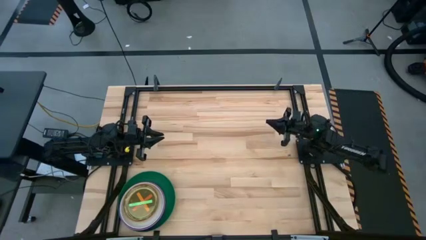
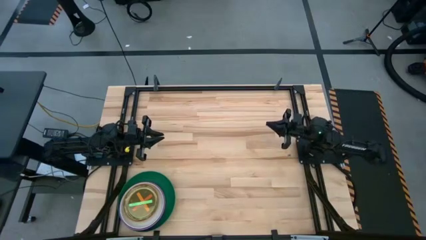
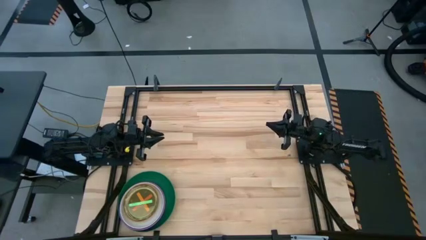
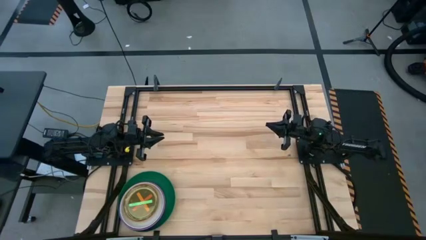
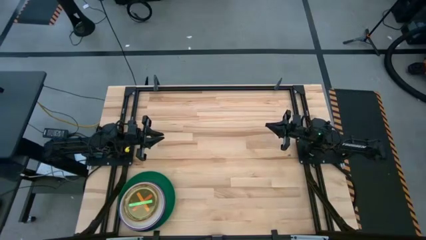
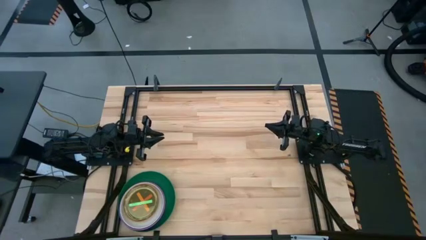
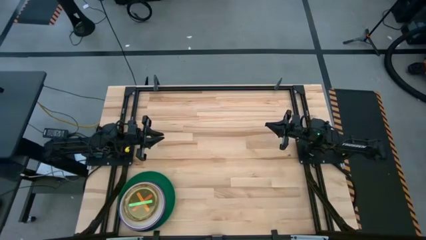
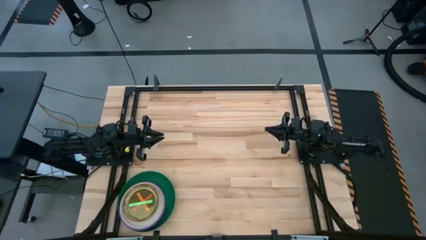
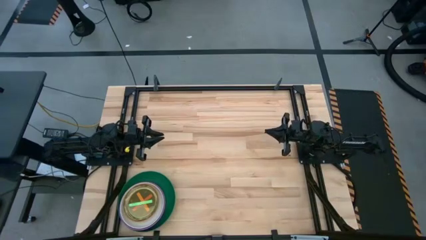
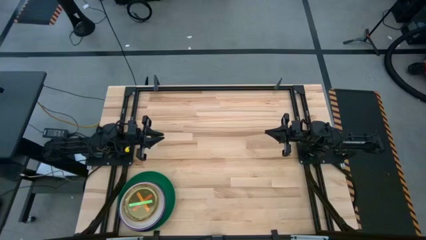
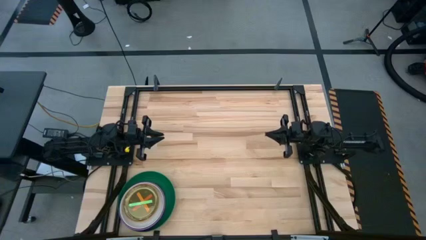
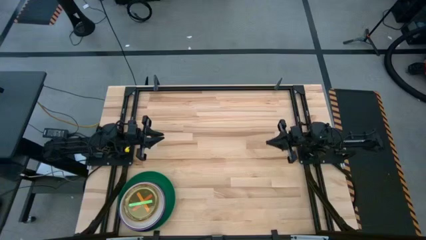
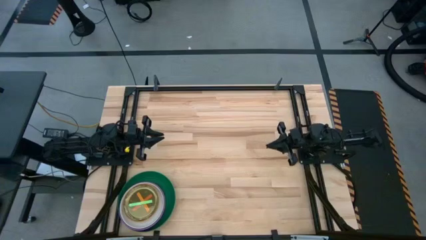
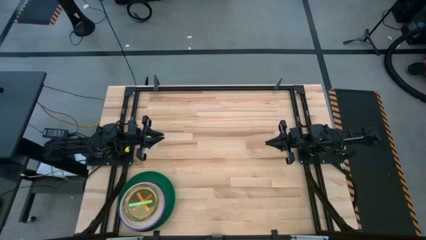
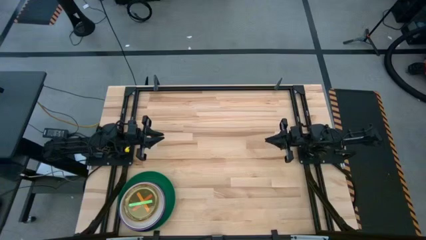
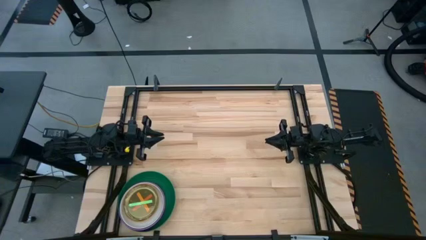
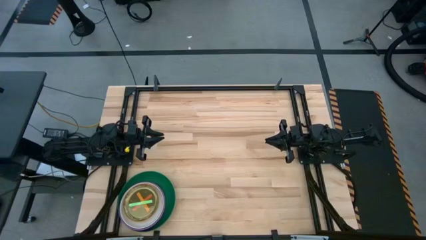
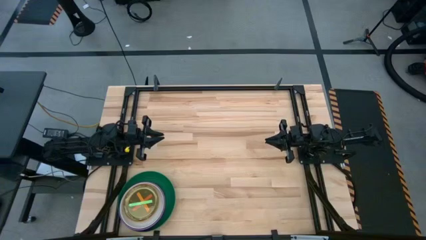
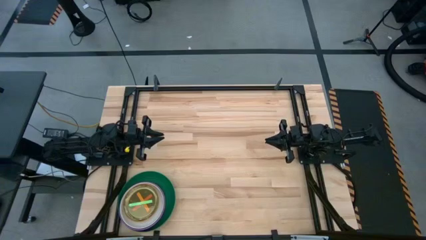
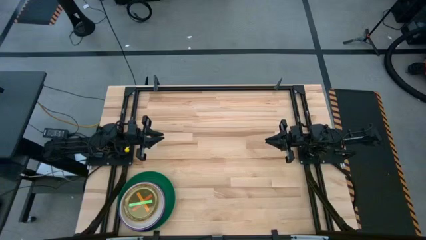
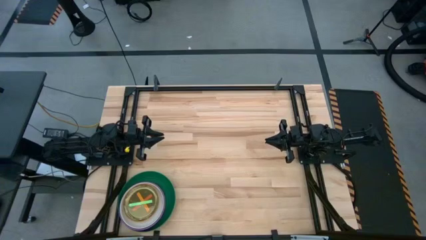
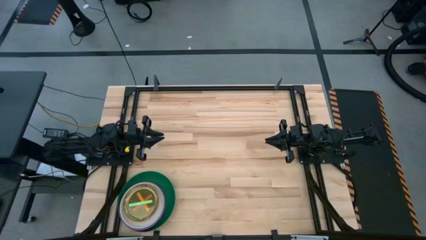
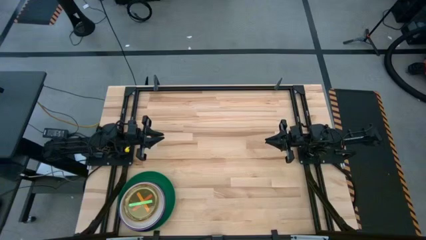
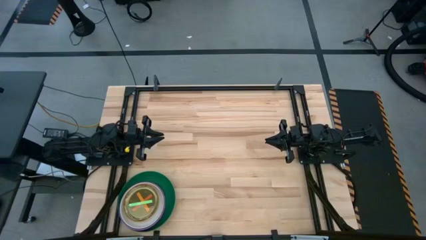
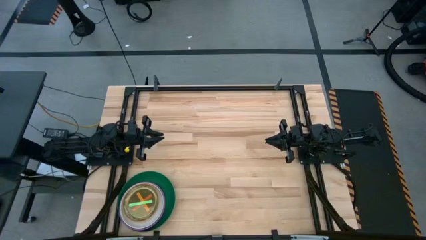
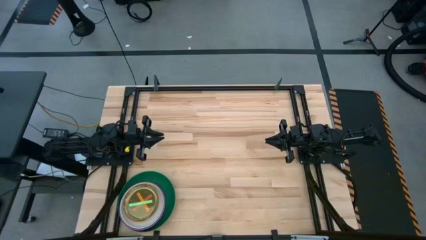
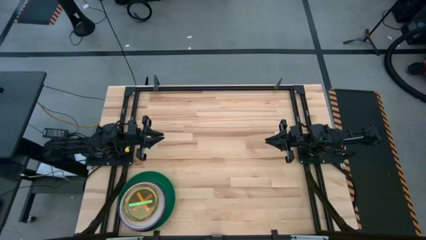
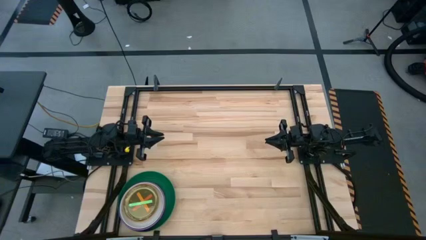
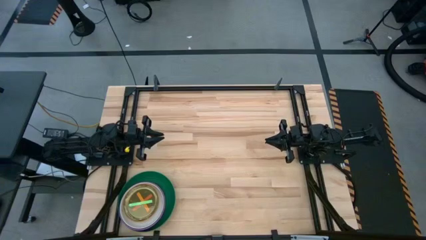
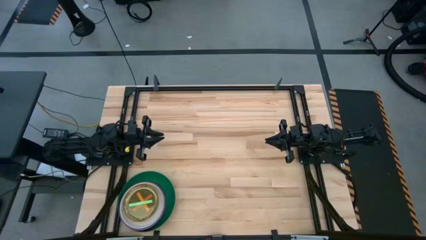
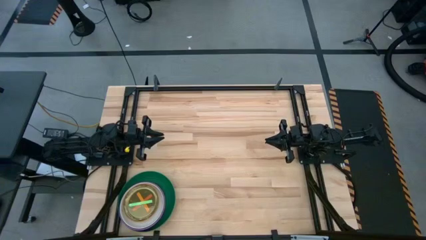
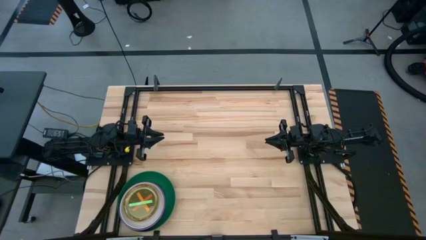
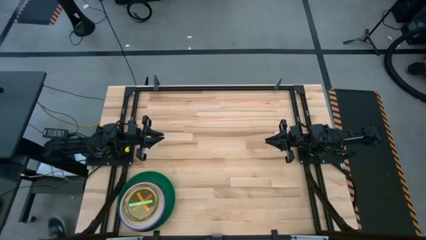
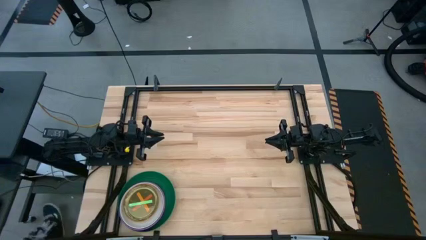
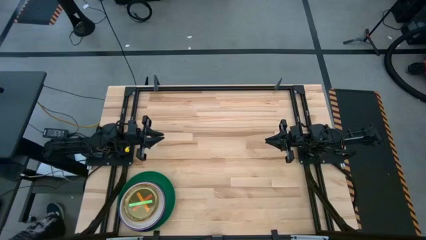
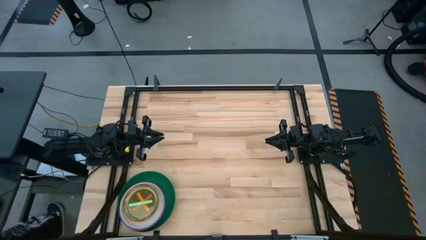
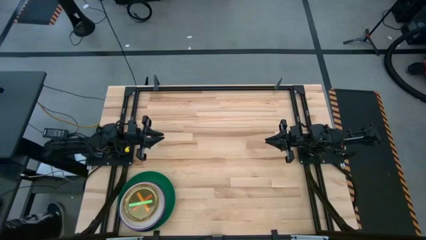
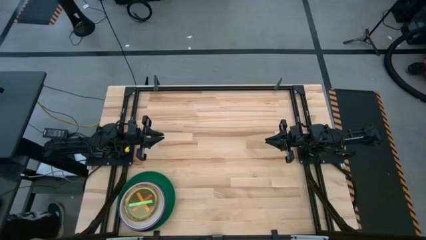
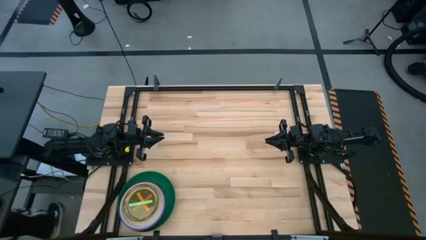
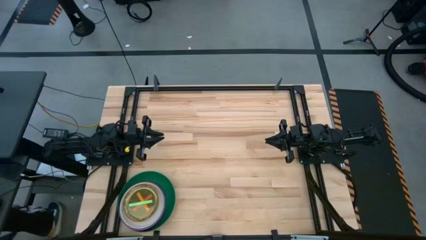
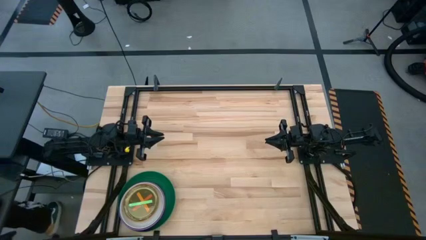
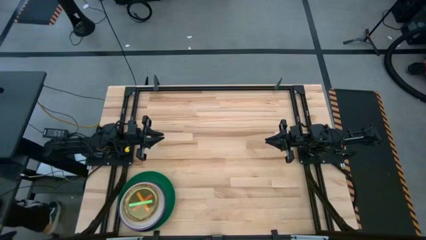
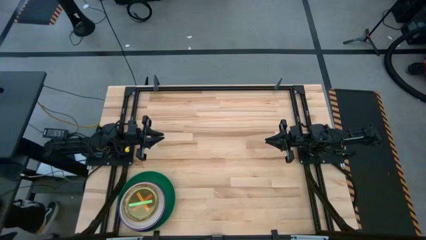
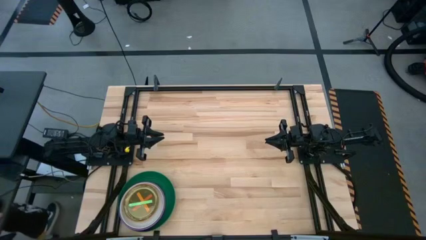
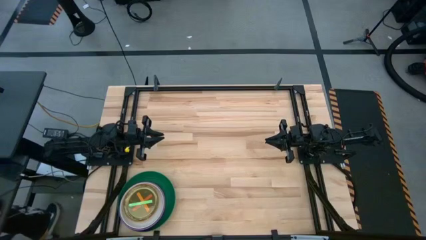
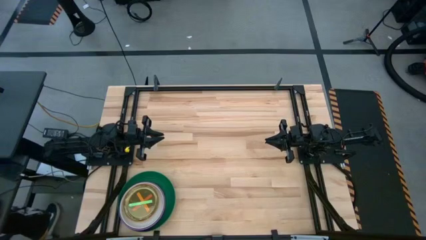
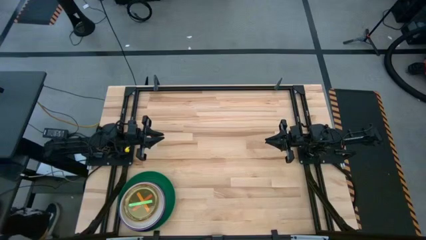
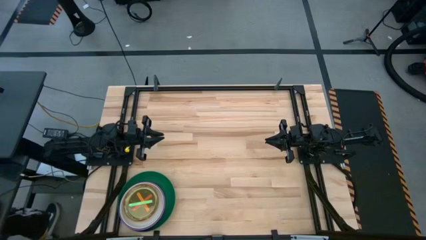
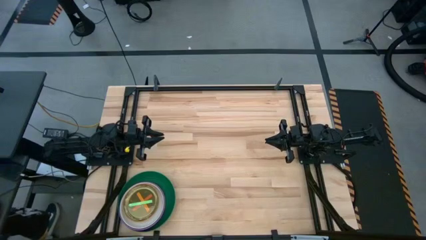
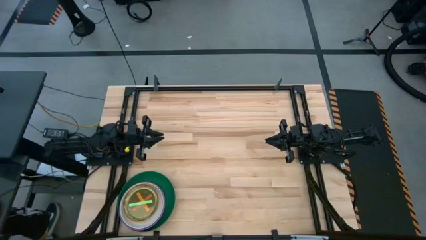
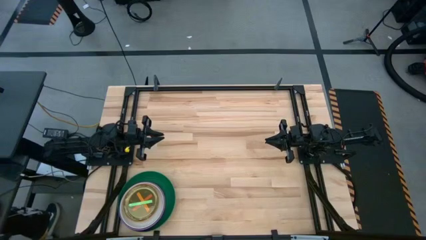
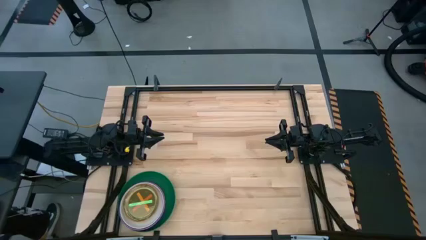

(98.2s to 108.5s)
Task: Stack plastic plates
Return to Home Position

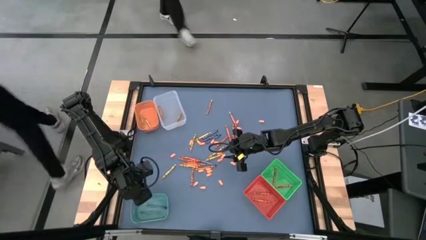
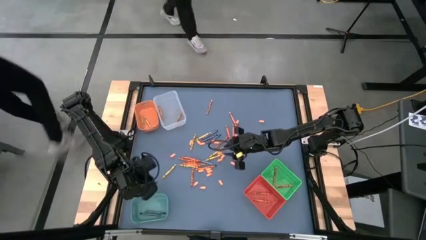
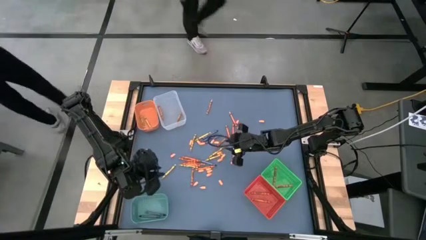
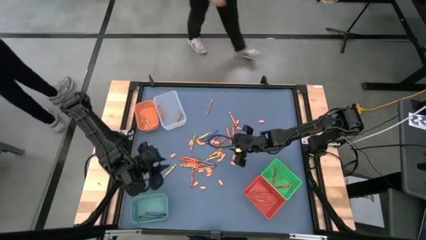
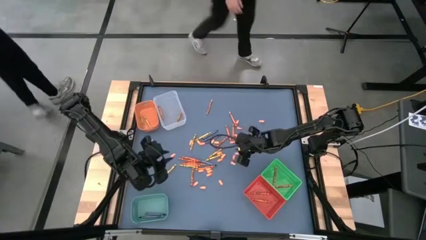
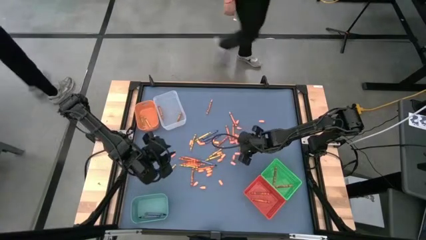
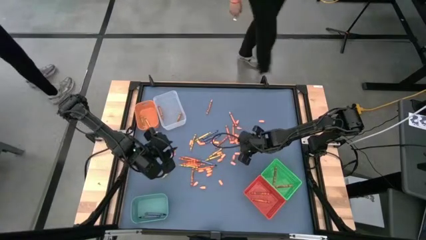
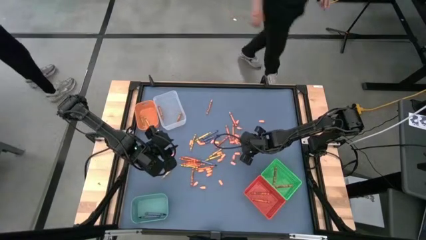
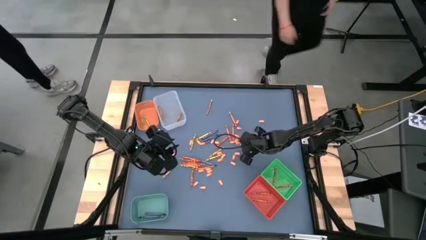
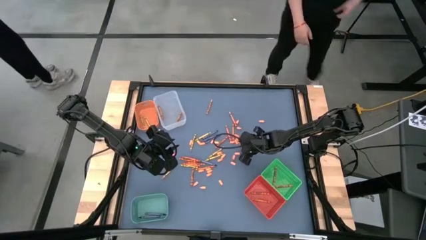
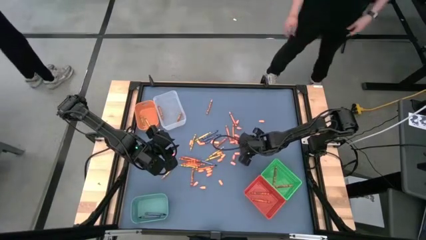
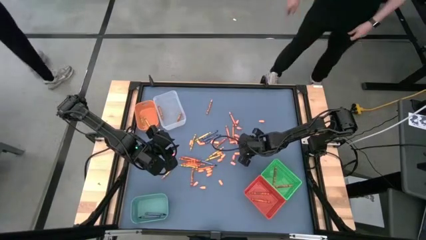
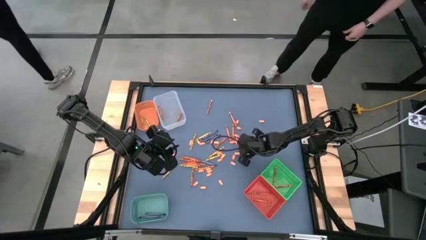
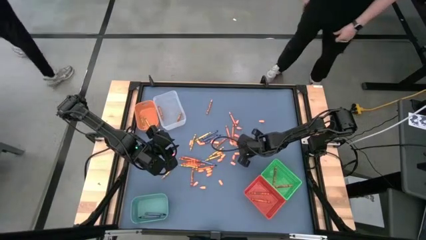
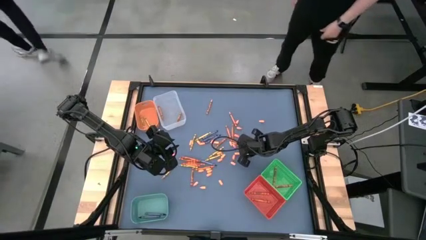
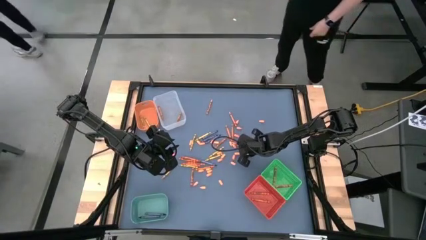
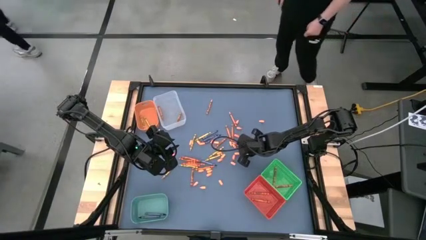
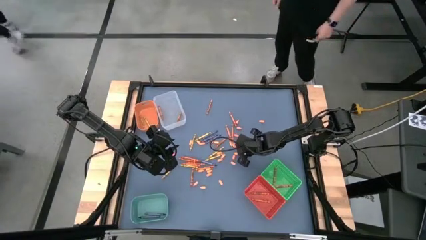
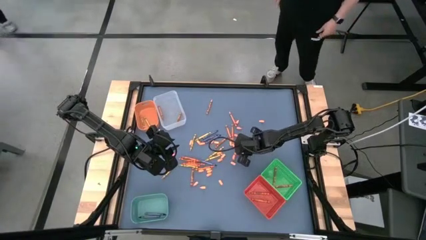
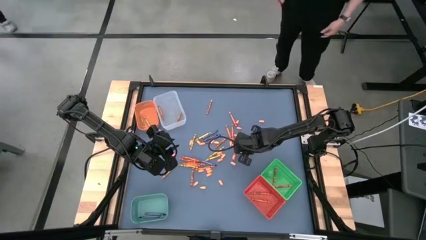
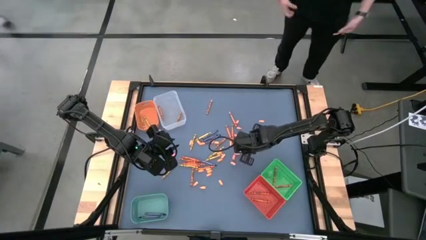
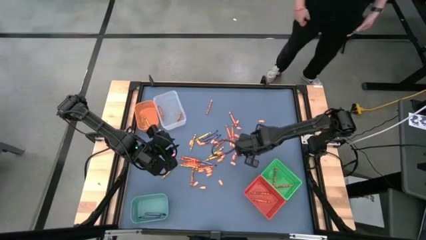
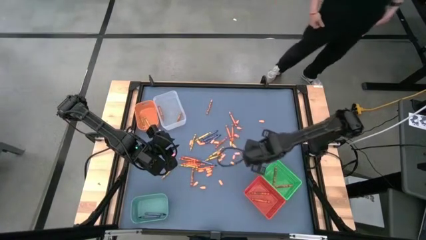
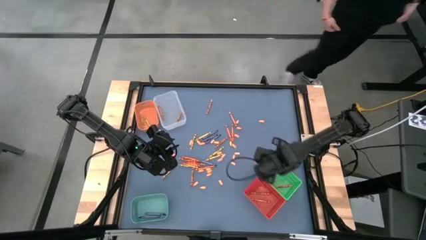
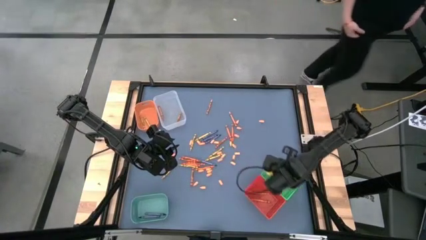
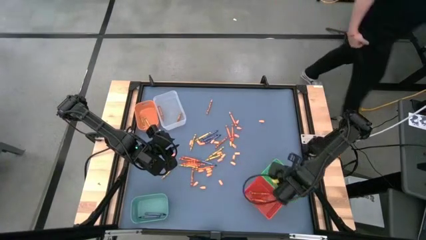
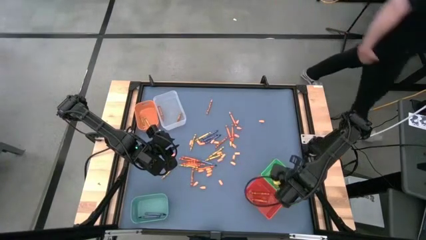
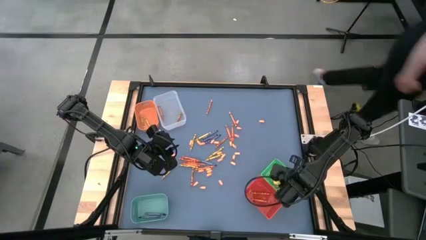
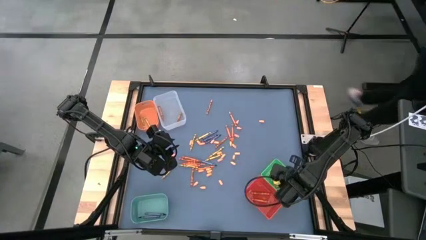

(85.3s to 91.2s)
Task: Sort crayons
Put the light orange crayon into the green bin
